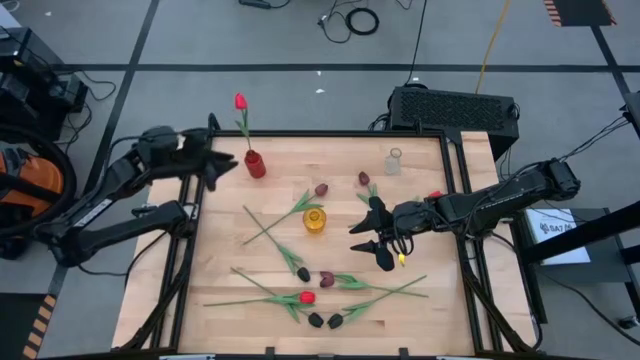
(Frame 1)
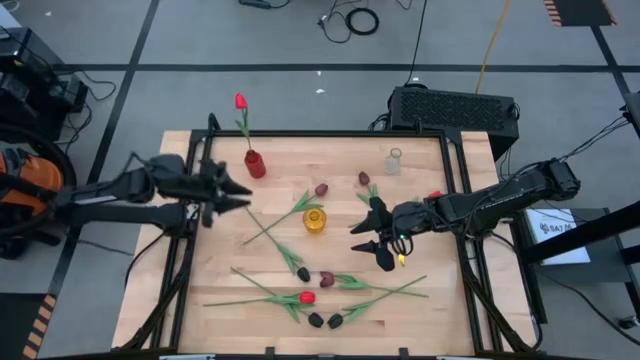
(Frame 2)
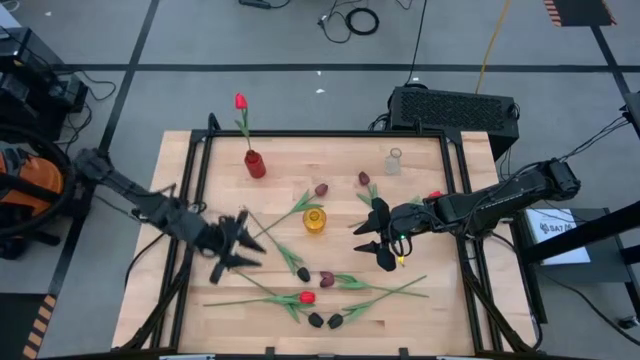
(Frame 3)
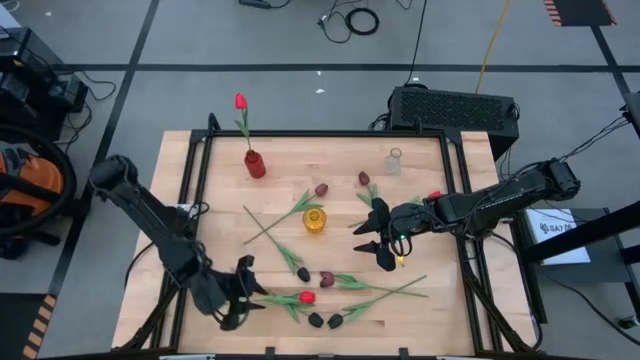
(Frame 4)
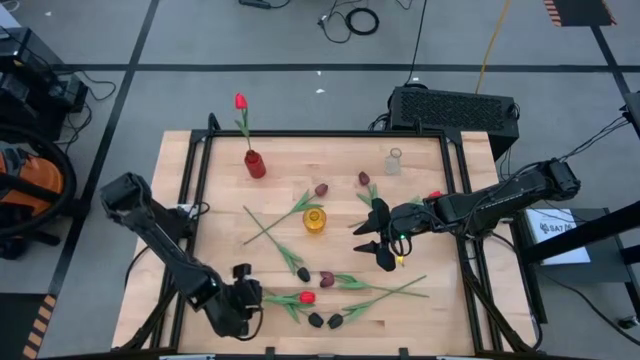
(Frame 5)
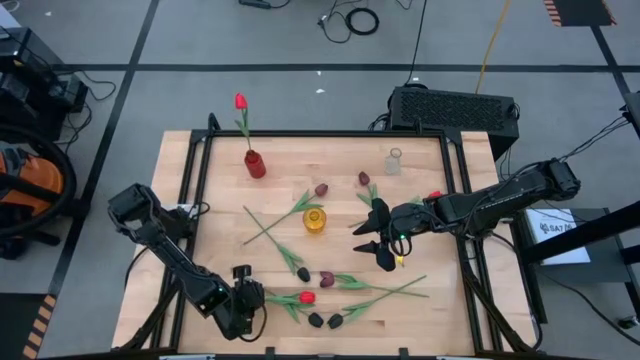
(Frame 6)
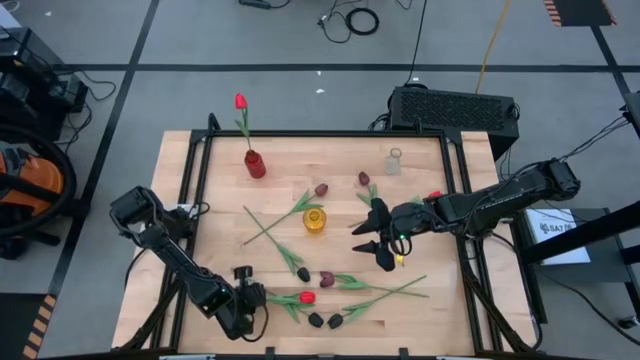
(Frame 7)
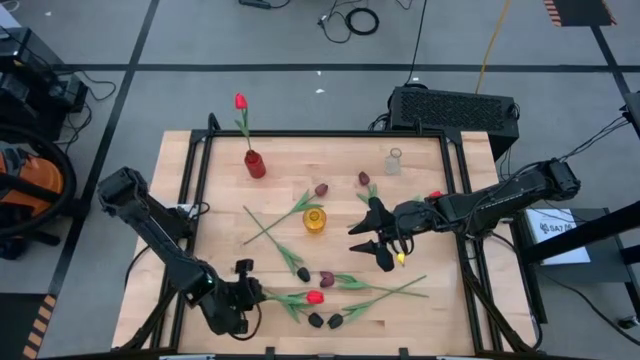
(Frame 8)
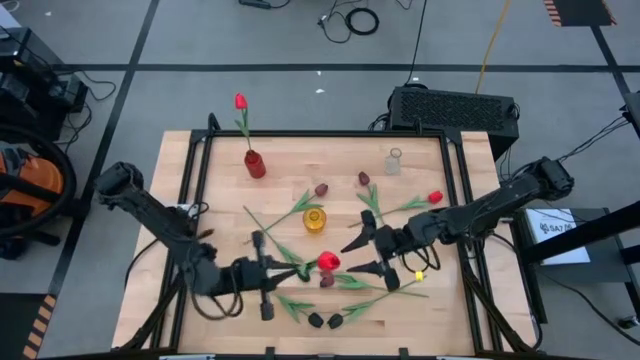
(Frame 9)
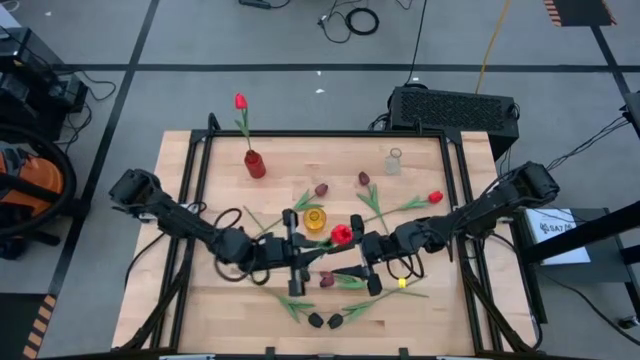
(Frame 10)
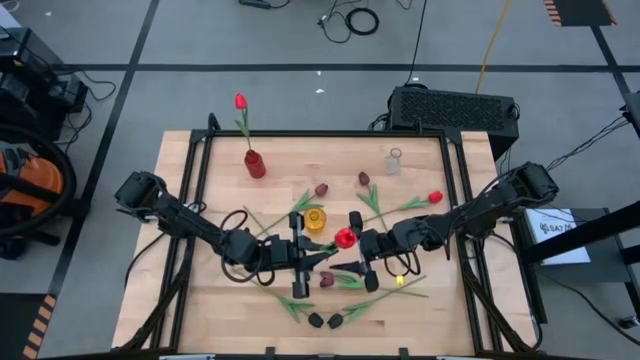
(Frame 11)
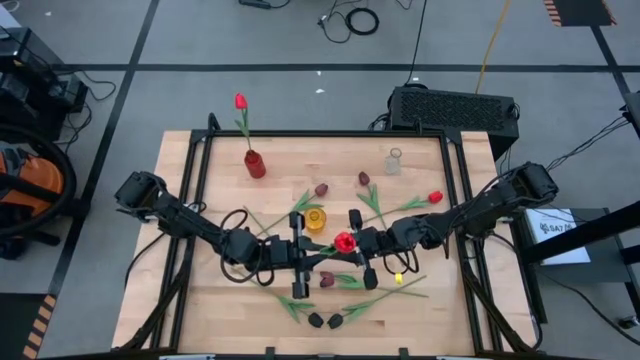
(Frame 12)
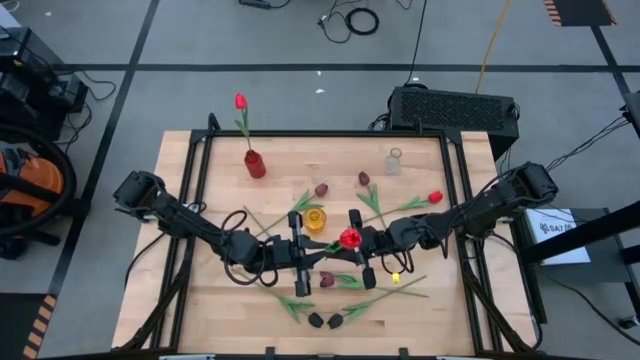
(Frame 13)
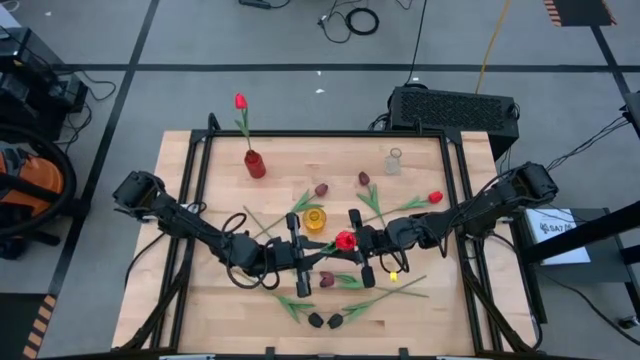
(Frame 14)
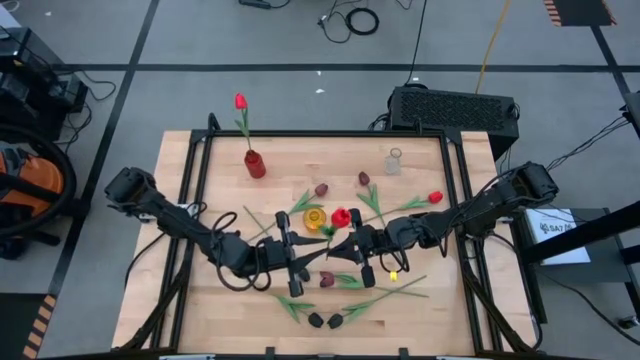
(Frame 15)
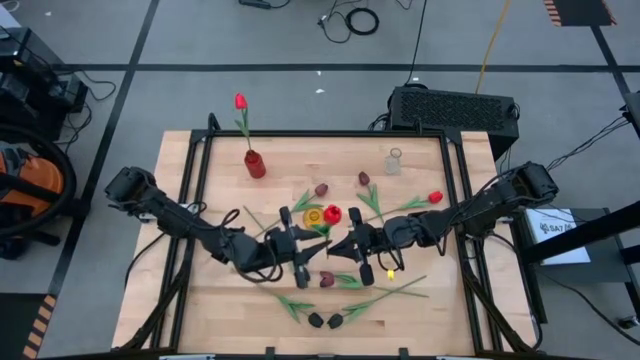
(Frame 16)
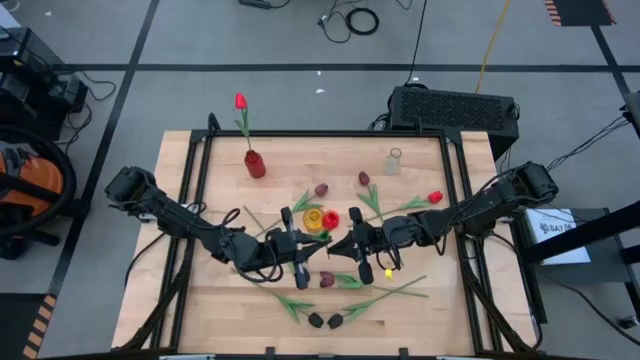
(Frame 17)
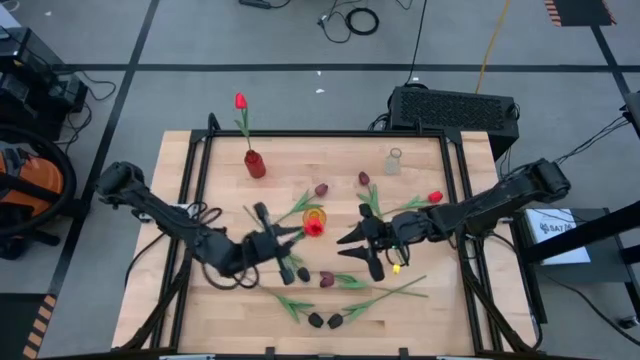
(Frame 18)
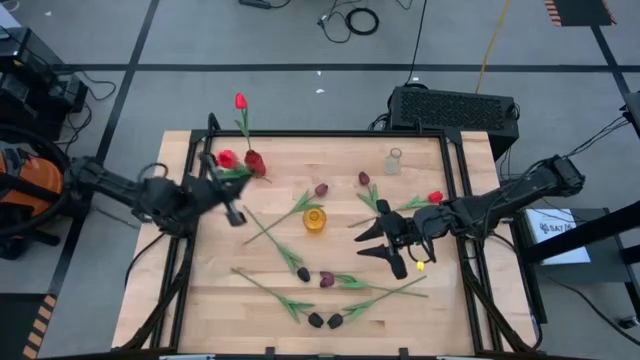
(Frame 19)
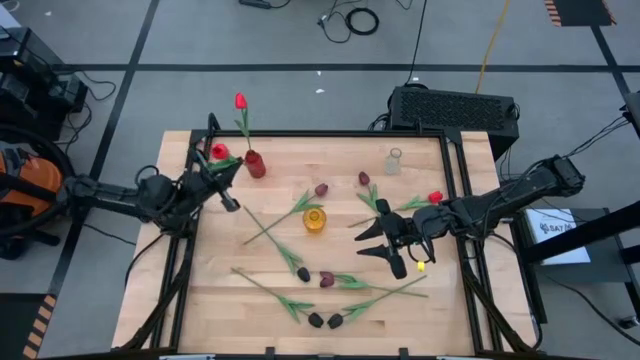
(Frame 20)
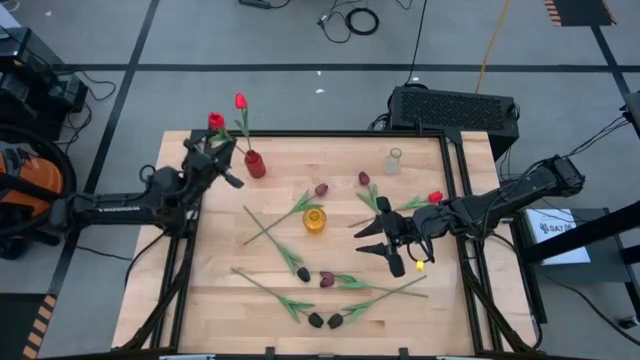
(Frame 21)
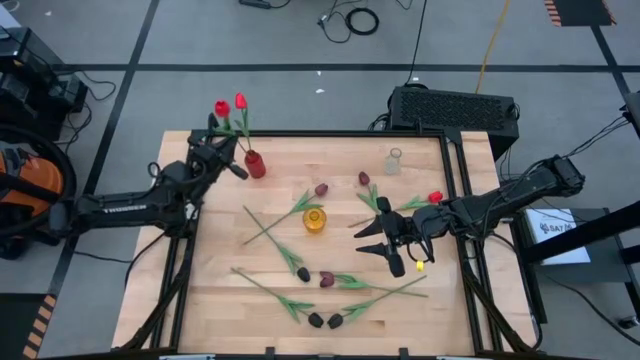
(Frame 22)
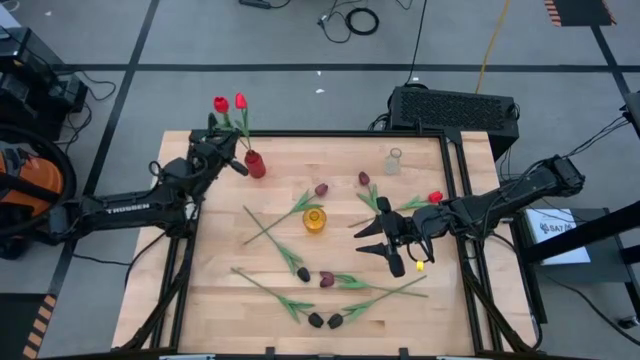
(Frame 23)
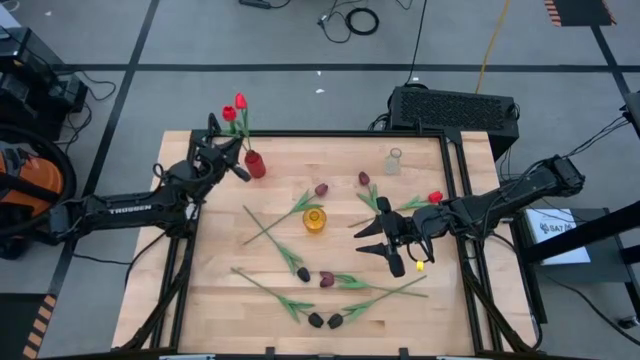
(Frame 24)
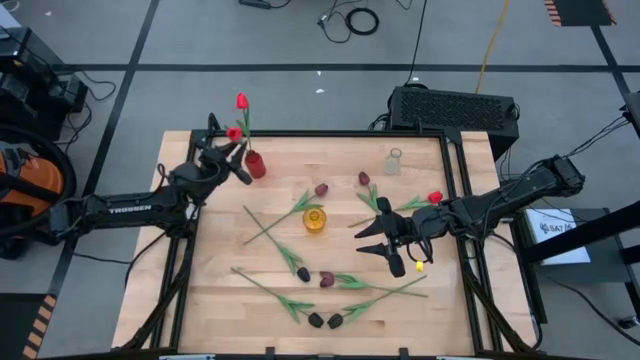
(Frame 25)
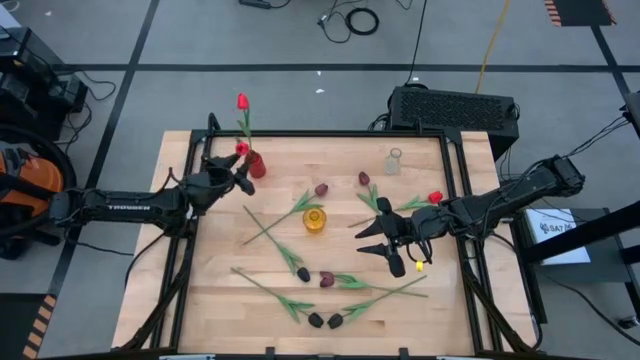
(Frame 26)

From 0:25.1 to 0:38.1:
Task: Sort flowers into vase by color
Put the bottom red flower into the red vase

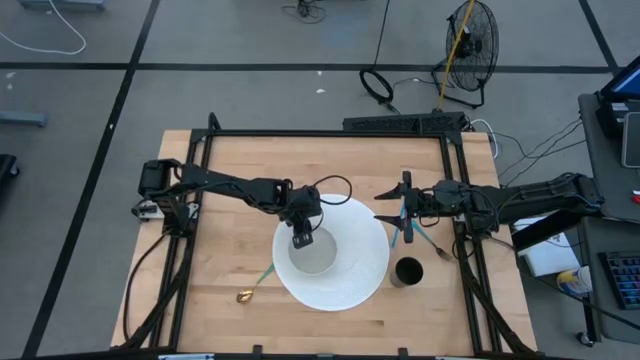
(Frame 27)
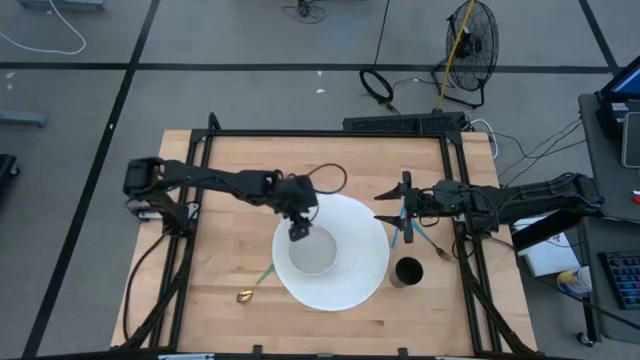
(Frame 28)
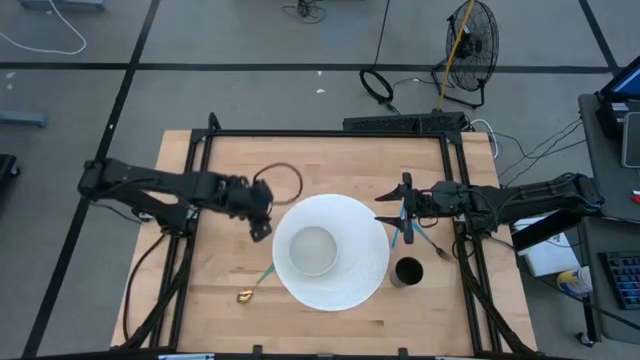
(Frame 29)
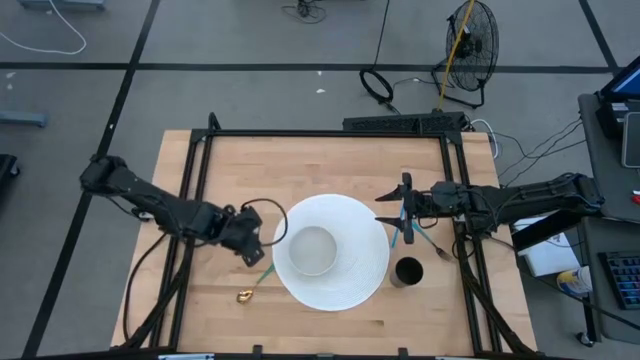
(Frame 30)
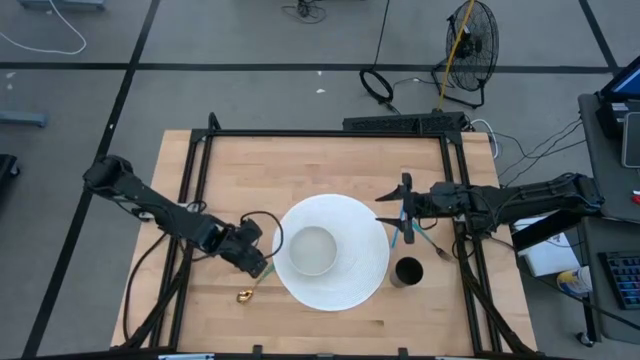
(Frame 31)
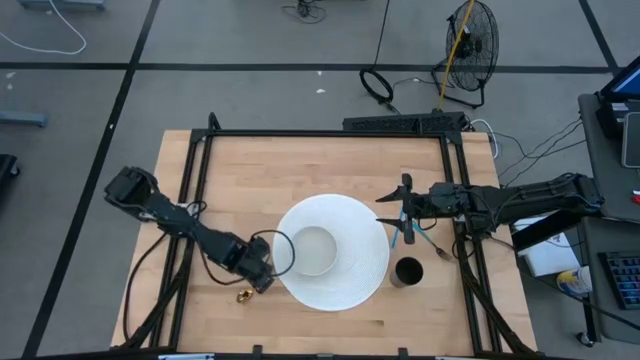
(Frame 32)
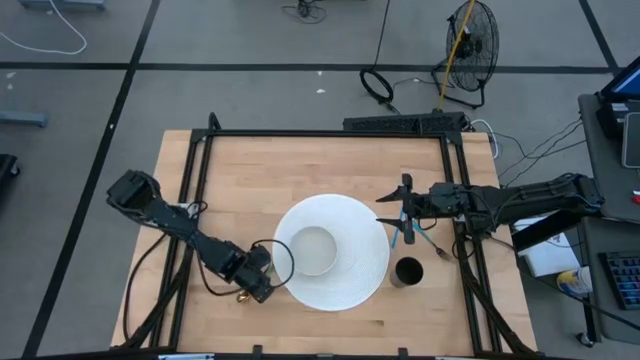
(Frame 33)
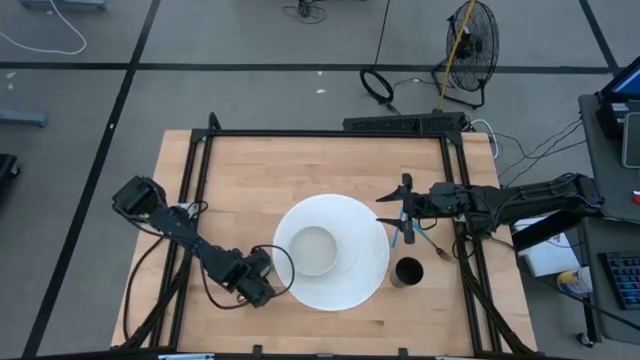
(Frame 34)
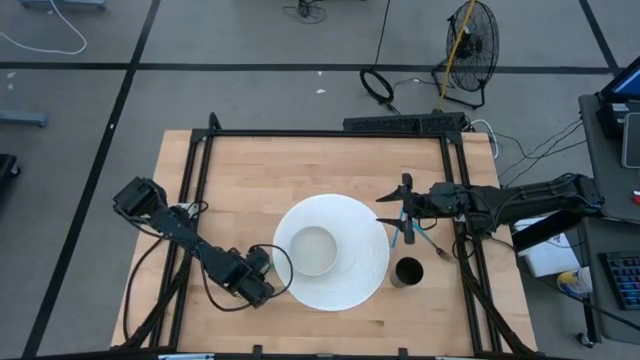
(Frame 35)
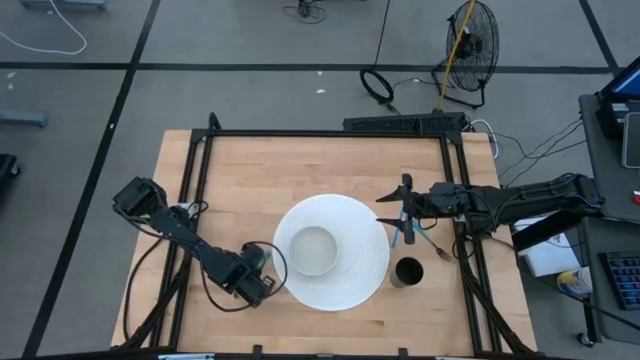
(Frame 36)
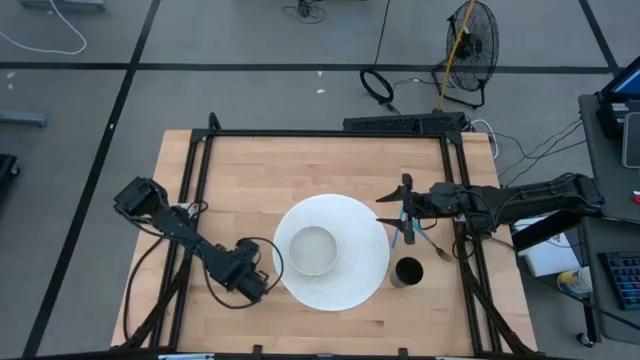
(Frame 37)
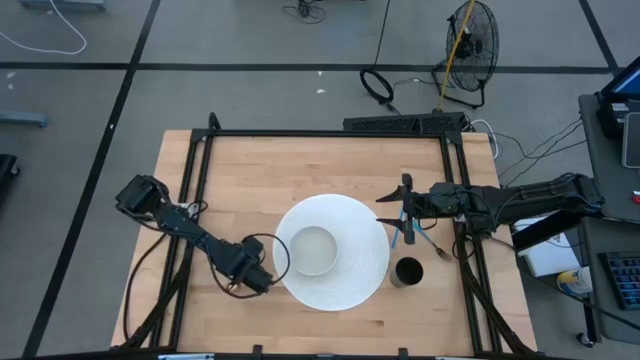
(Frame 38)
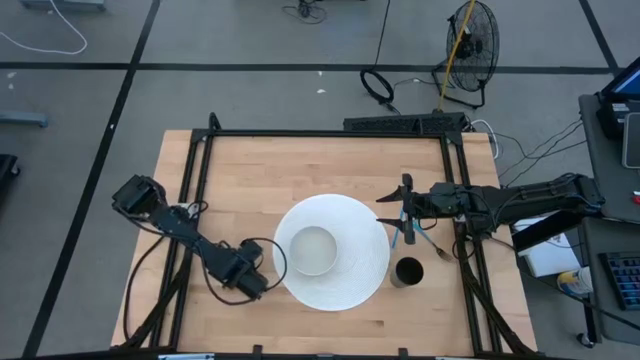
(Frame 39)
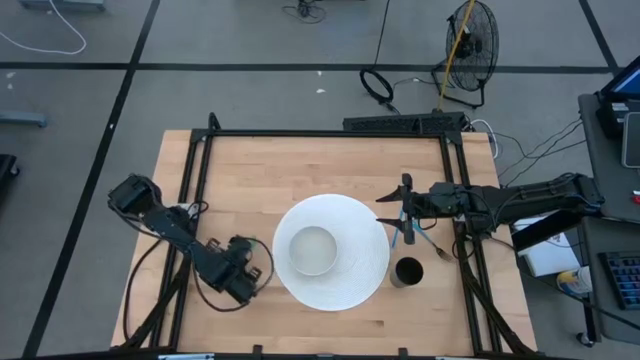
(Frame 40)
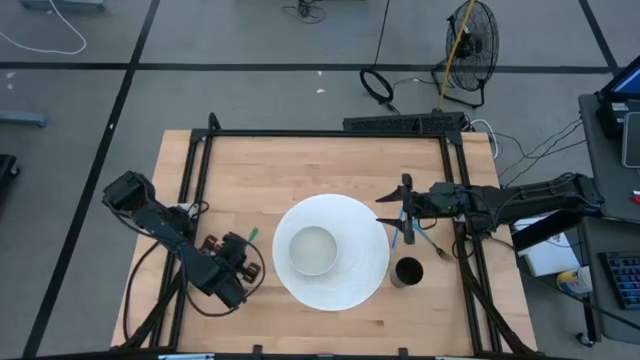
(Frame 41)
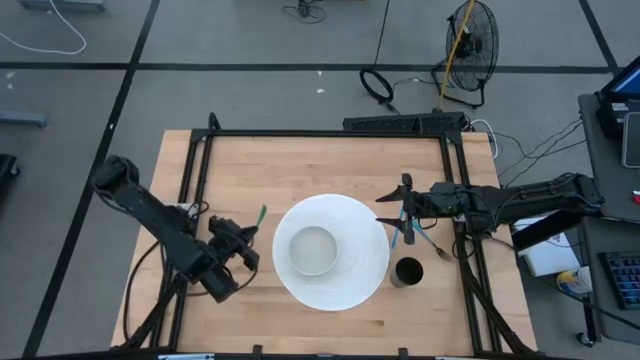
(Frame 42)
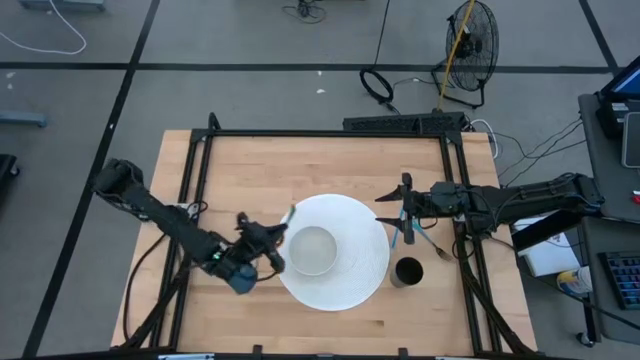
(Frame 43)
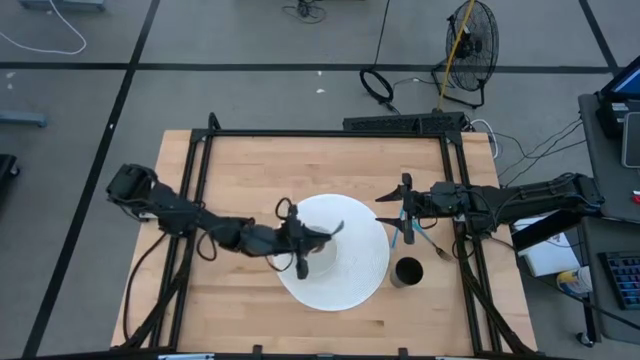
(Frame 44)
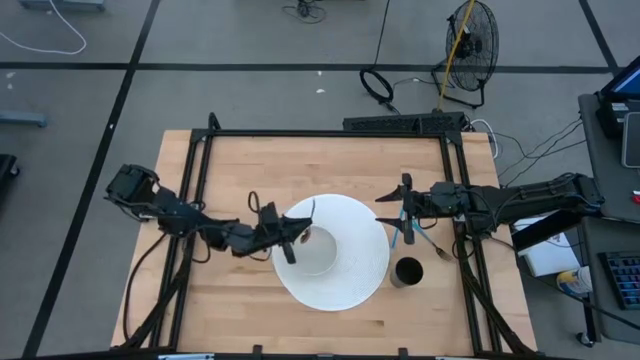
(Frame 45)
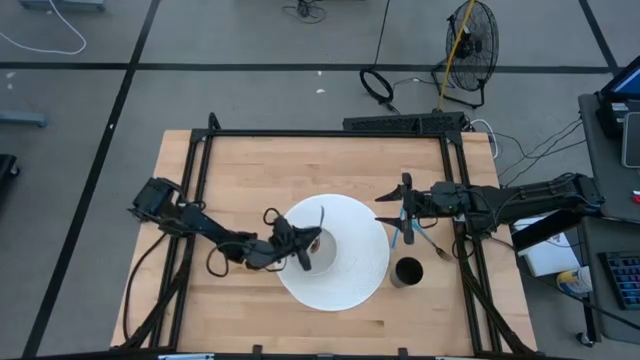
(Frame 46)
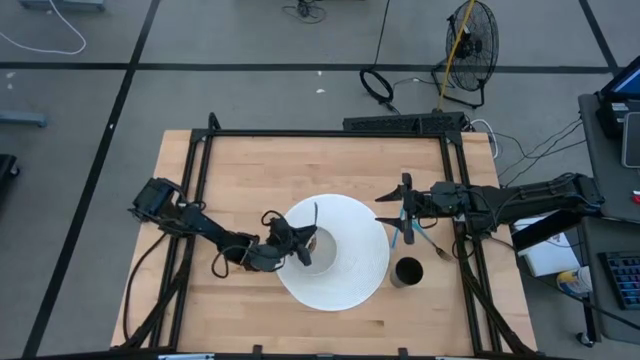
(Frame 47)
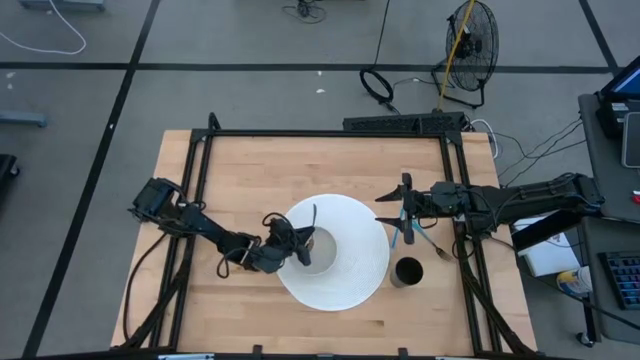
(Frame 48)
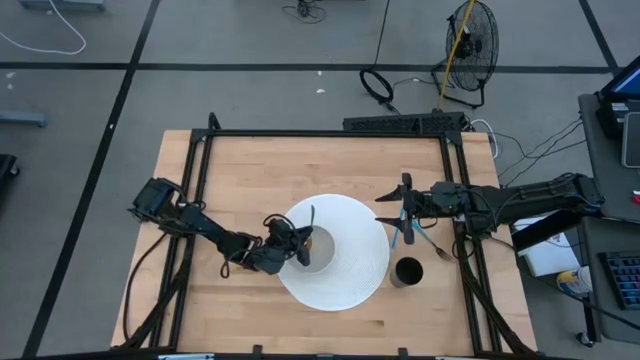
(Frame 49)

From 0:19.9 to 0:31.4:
Task: Pick & Place Utensil
Put the green spoon into the white bowl on the white mat
